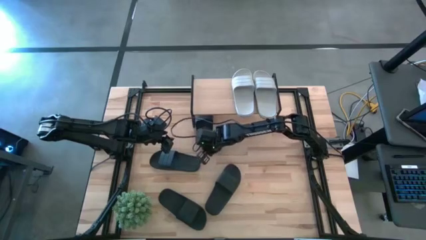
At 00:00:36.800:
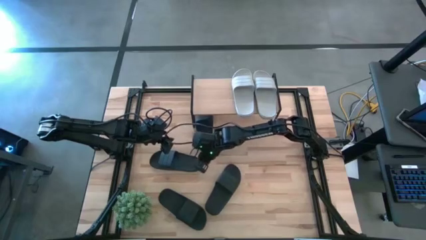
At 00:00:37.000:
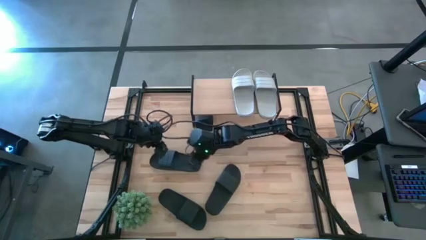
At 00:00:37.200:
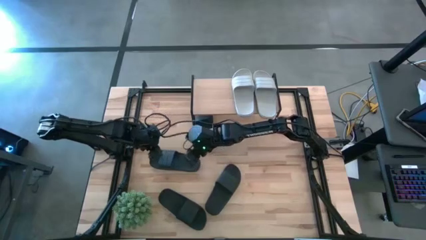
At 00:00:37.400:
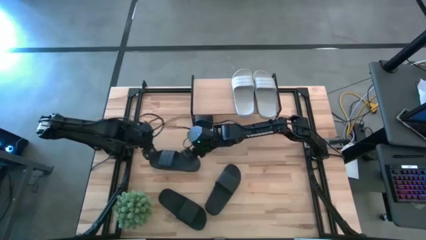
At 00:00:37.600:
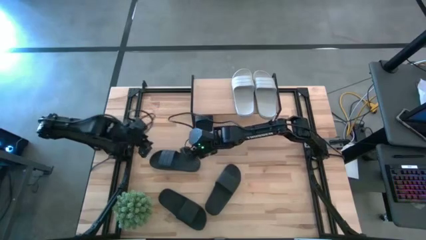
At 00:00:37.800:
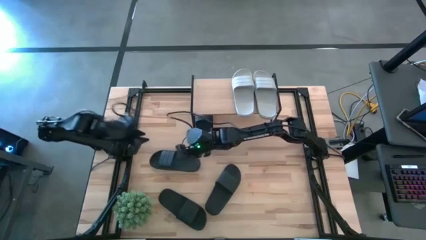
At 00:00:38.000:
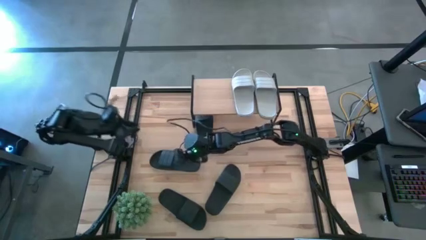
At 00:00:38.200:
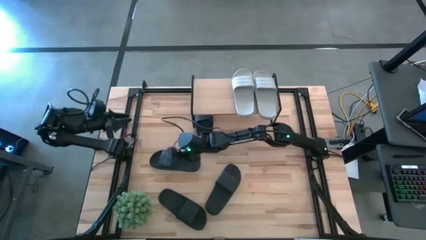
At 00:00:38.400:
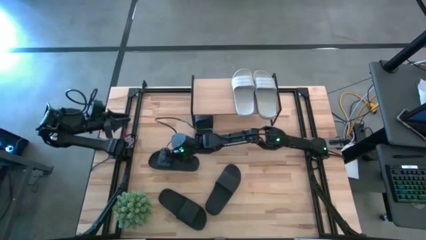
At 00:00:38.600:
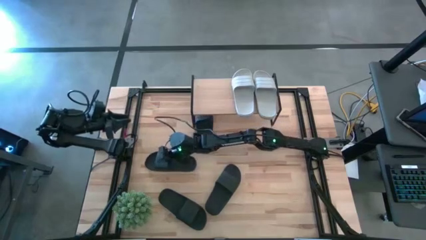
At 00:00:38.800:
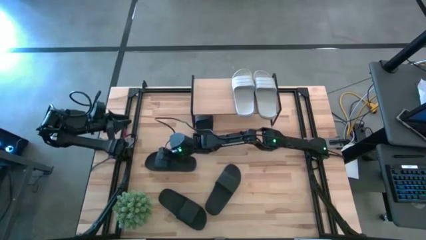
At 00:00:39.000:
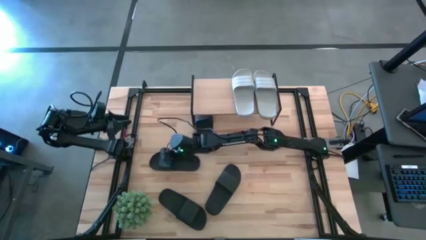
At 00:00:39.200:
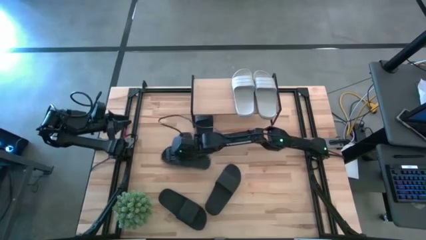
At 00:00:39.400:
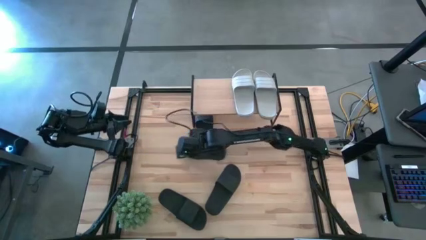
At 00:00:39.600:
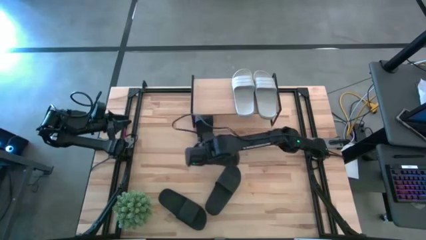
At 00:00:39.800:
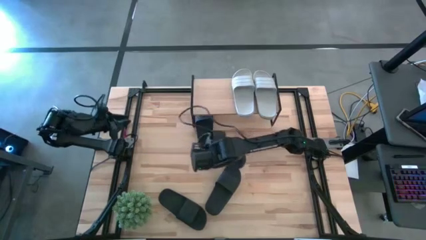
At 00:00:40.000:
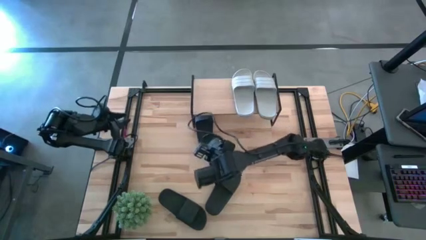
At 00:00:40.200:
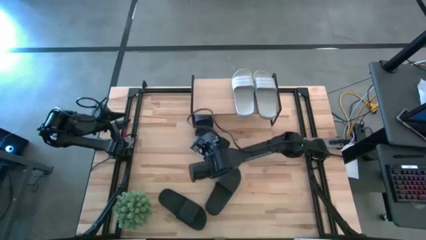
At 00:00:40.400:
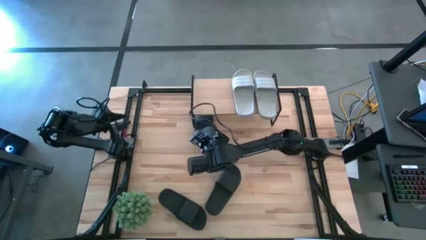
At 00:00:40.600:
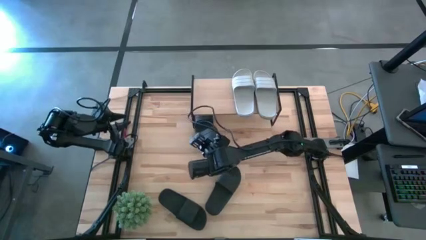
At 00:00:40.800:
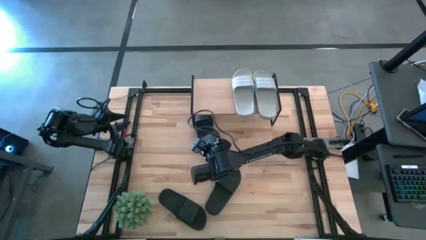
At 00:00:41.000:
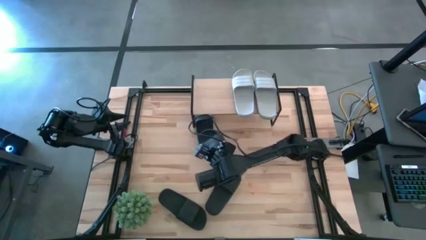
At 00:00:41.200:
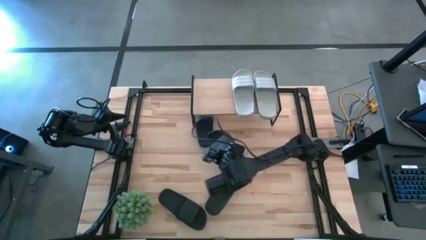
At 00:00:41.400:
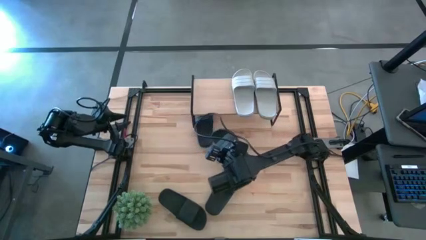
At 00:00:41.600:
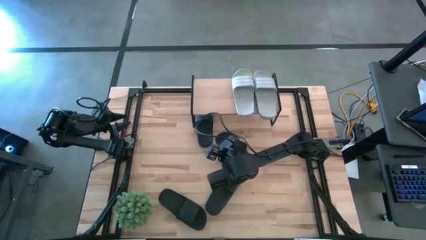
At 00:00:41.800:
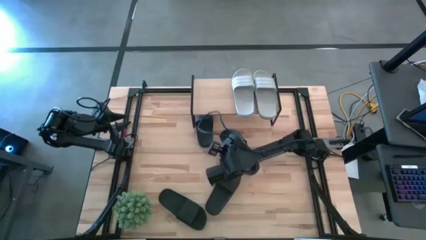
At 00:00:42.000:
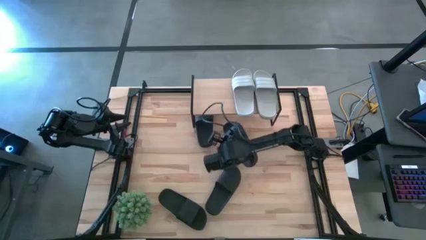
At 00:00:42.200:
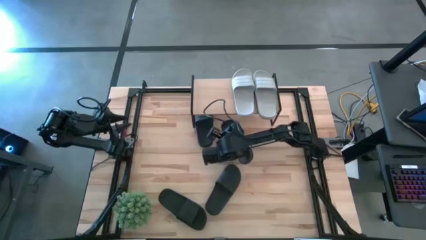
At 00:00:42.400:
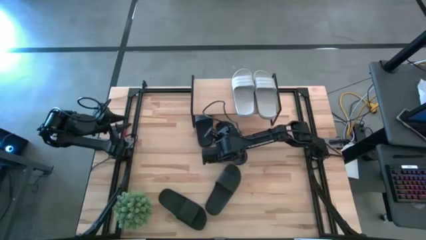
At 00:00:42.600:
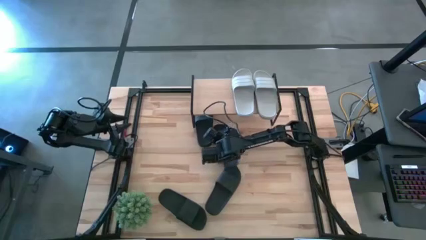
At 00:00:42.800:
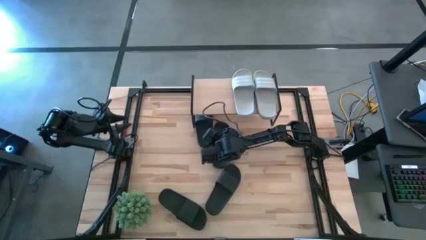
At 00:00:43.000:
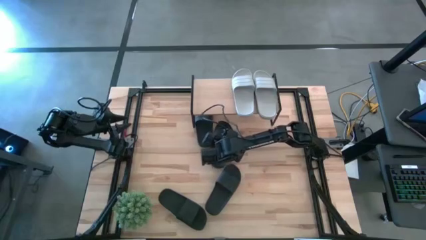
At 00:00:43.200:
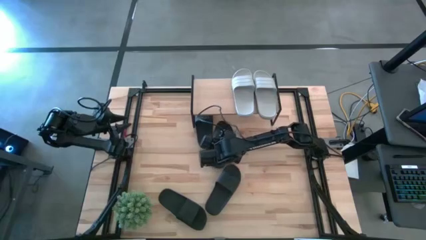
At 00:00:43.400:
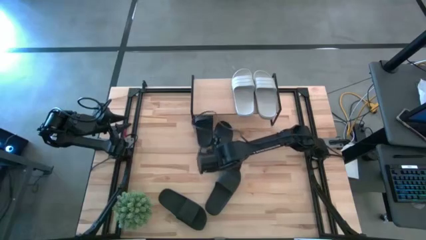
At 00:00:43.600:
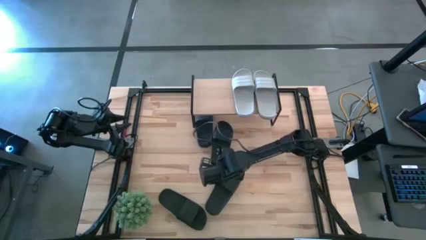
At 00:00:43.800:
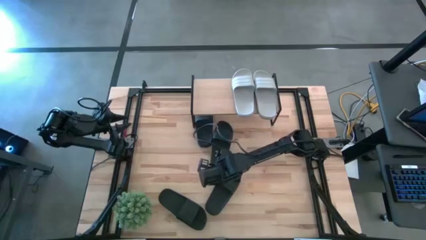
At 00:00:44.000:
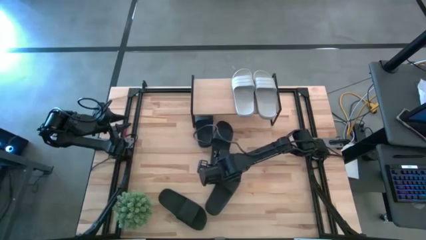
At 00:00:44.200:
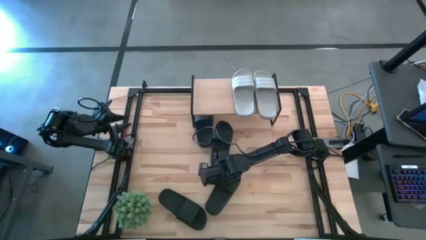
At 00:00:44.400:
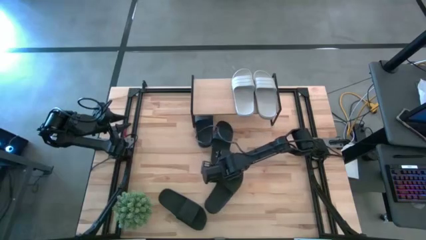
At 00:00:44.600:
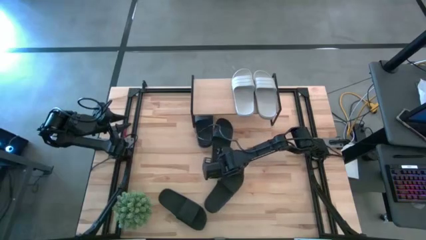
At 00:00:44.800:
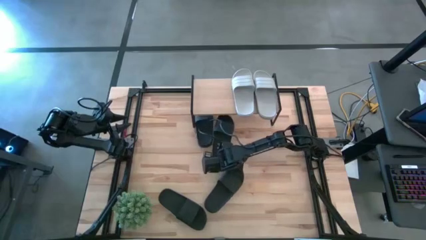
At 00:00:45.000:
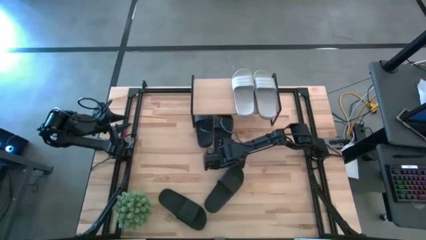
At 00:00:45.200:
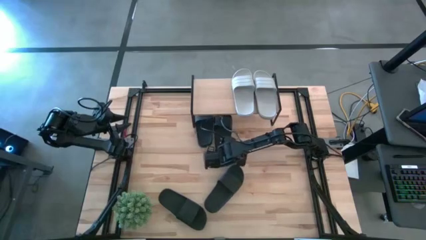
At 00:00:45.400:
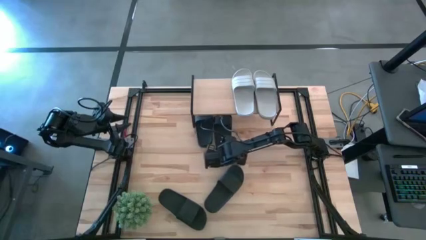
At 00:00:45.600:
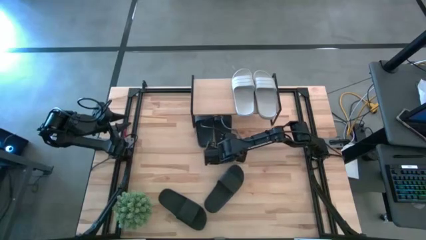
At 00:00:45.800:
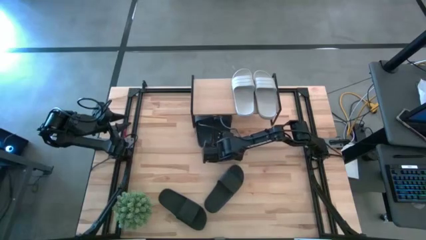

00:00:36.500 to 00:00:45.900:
Task: Pick and place slides into the shelf
Put the black slide under the shelf

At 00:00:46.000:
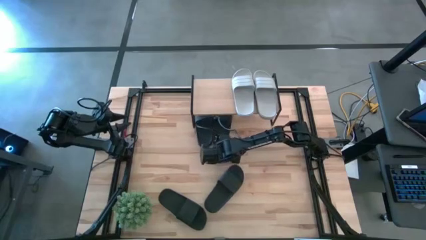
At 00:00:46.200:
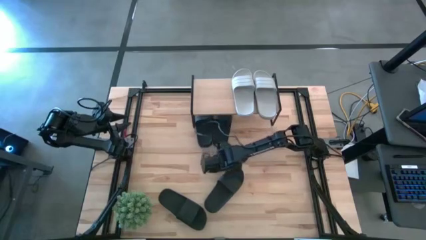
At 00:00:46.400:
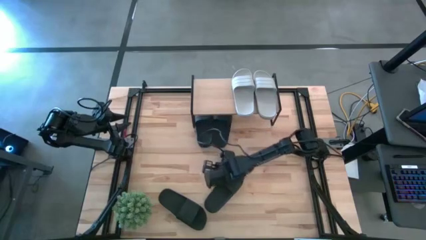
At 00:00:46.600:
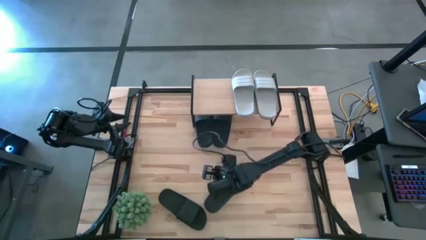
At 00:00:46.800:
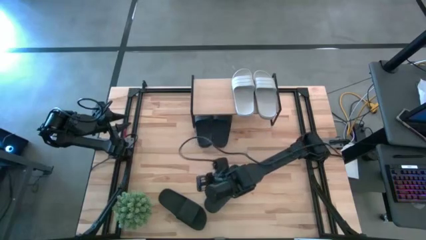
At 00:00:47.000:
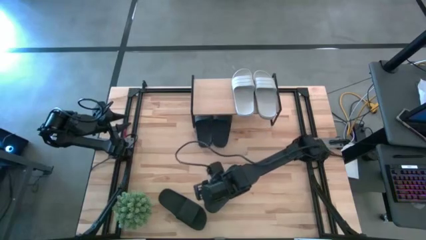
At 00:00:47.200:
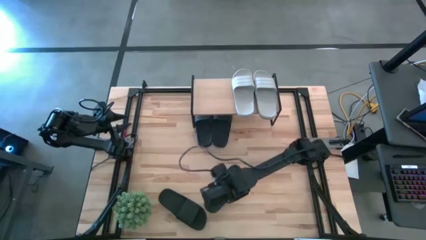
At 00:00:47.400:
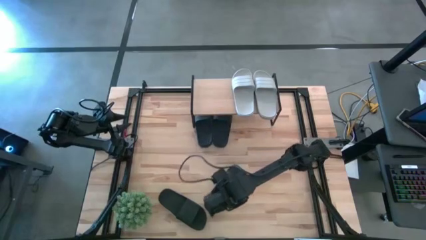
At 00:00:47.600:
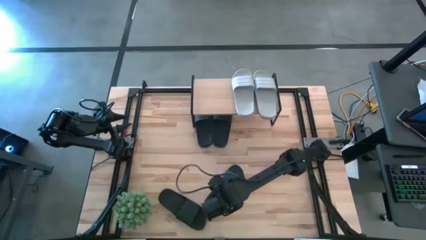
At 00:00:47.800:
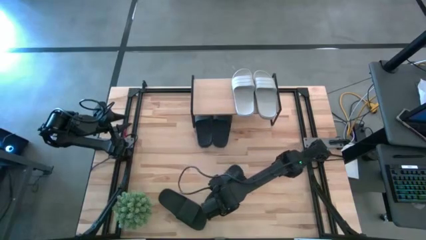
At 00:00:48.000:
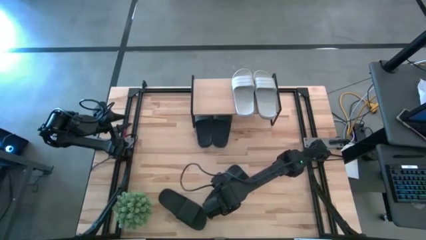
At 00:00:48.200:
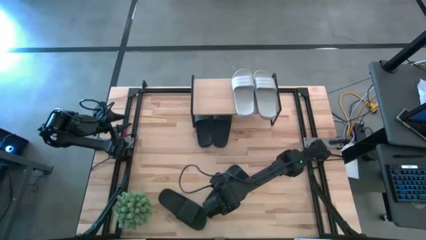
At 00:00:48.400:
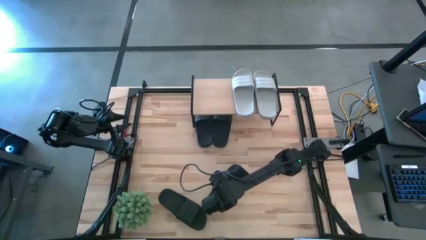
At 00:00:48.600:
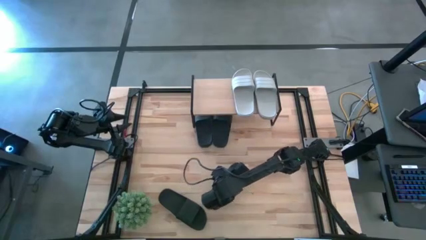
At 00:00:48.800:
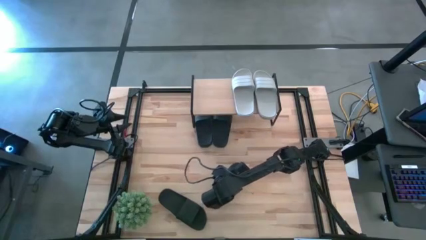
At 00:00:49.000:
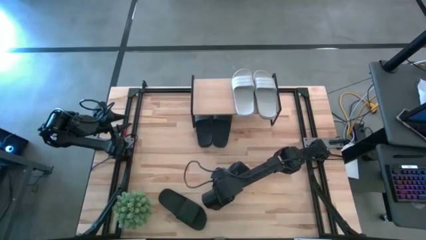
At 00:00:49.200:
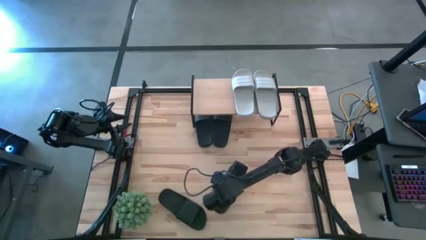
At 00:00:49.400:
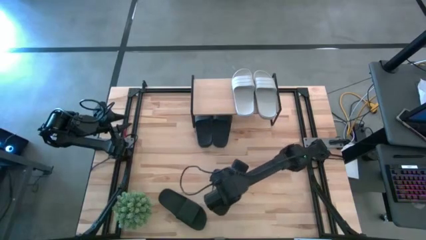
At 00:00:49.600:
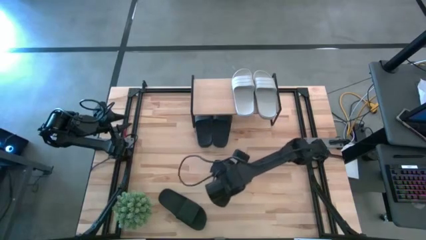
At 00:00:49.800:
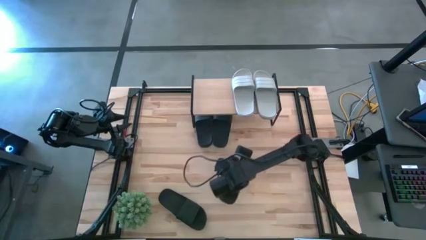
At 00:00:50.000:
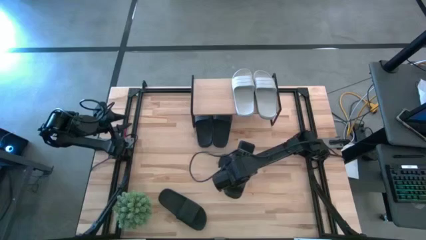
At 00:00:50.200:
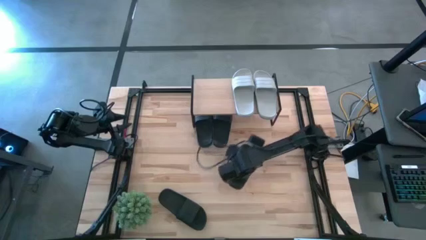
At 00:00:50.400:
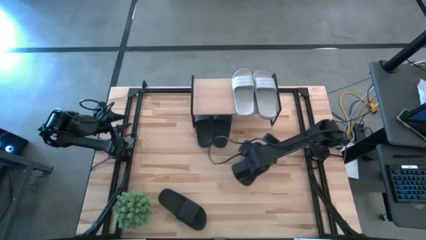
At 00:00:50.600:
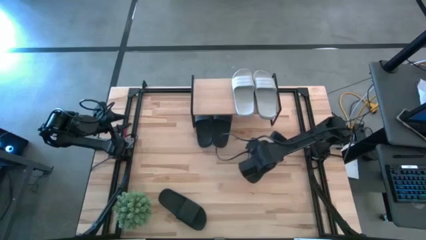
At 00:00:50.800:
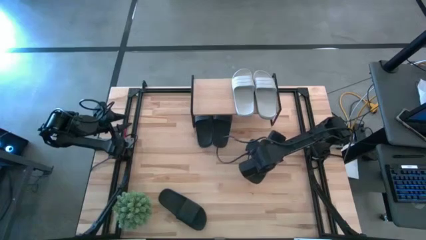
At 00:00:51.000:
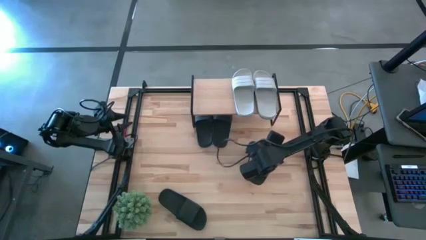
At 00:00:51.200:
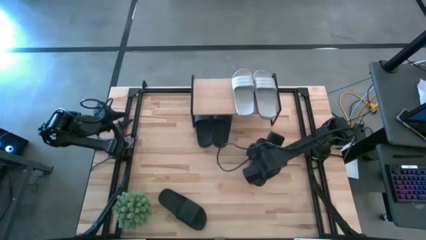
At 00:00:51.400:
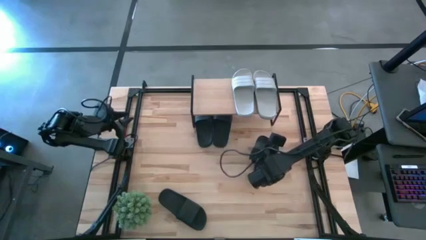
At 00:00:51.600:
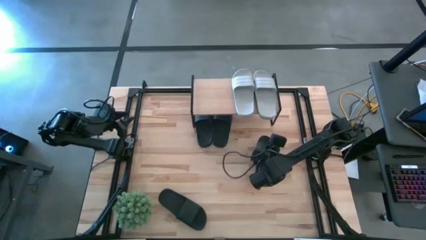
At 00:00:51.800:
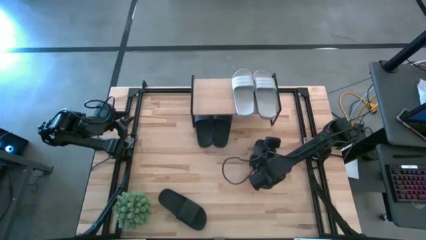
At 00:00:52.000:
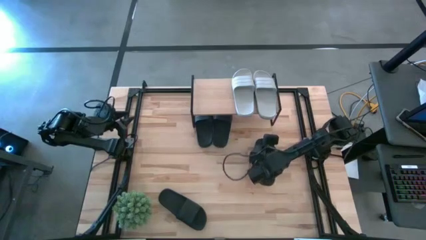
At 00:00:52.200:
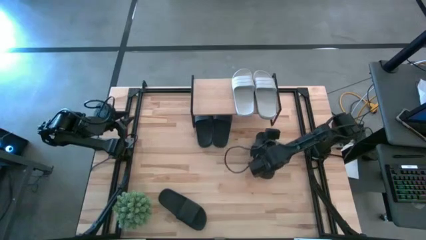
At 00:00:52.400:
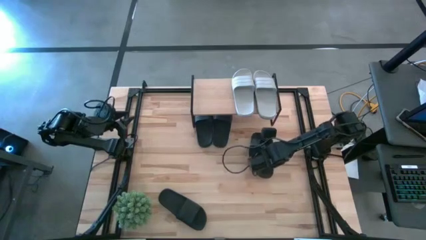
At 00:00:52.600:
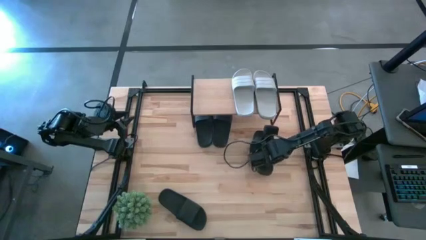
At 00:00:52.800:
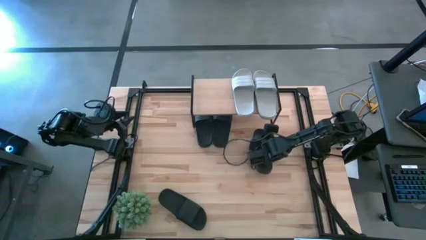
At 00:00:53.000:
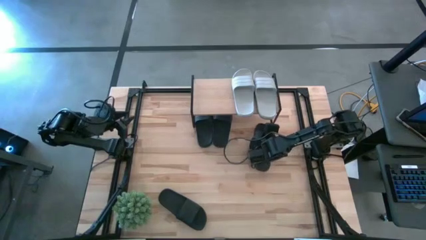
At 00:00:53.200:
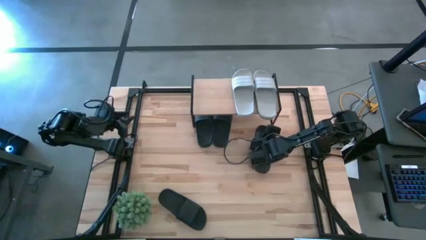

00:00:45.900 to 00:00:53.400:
Put the black slide near the shelf
